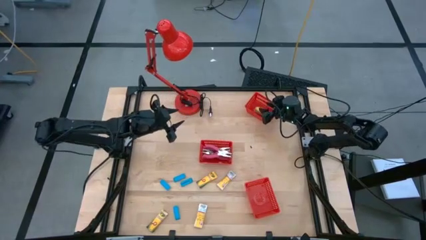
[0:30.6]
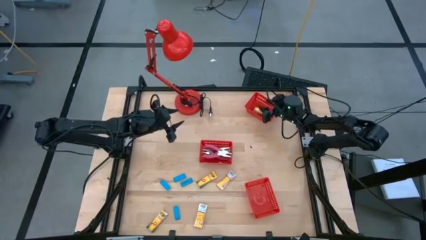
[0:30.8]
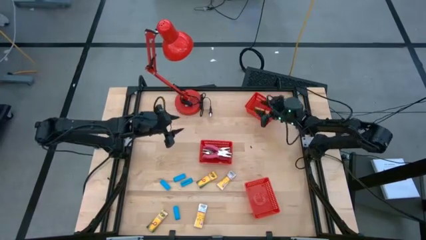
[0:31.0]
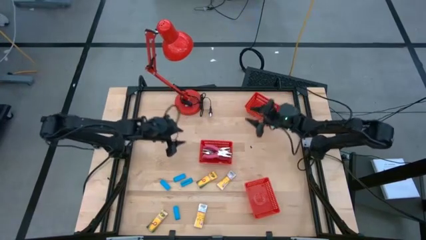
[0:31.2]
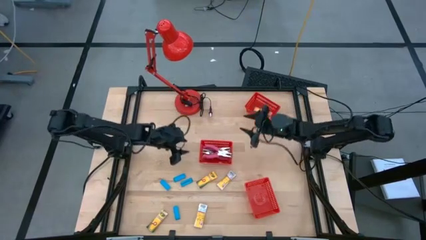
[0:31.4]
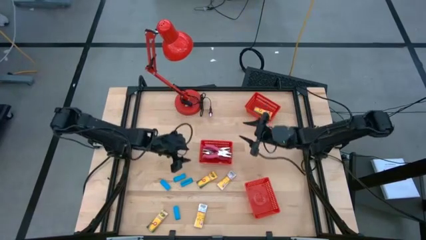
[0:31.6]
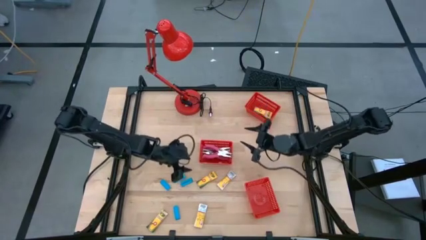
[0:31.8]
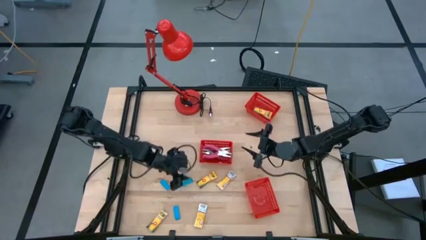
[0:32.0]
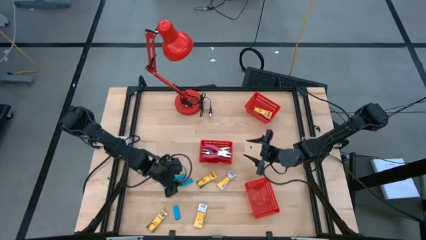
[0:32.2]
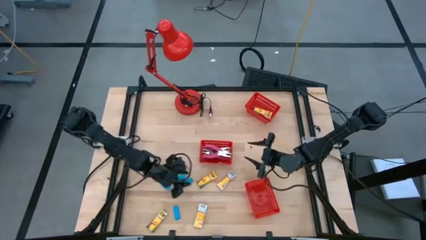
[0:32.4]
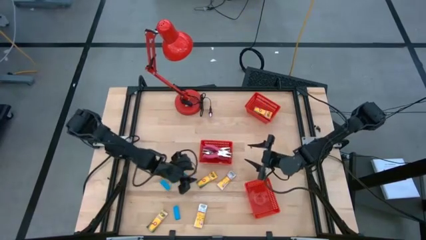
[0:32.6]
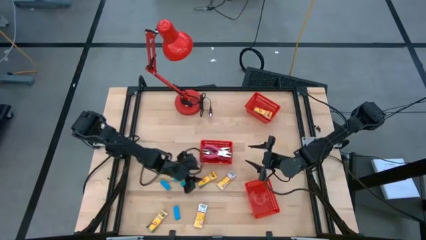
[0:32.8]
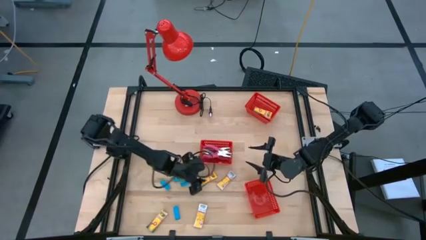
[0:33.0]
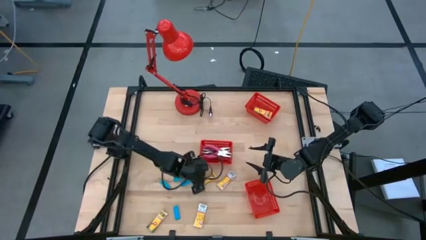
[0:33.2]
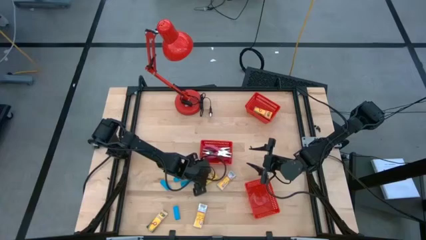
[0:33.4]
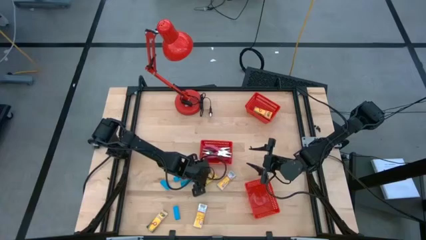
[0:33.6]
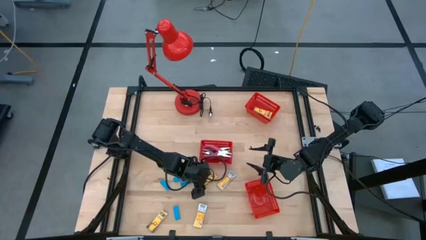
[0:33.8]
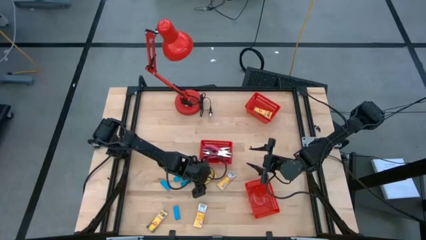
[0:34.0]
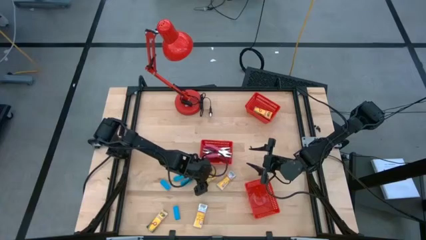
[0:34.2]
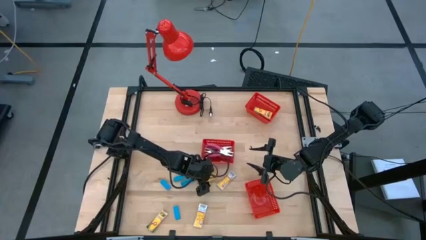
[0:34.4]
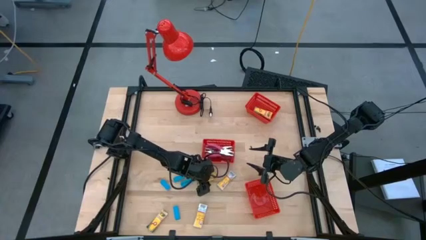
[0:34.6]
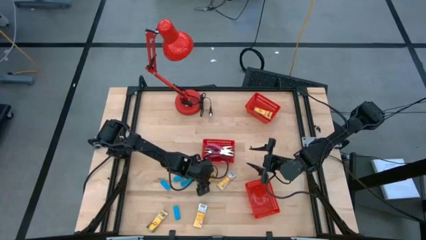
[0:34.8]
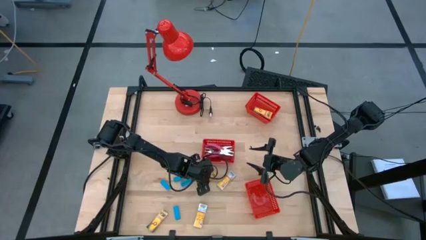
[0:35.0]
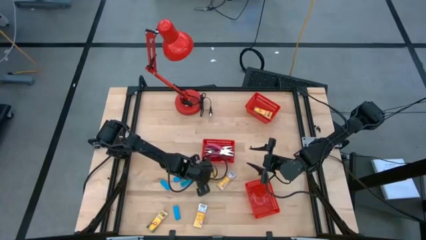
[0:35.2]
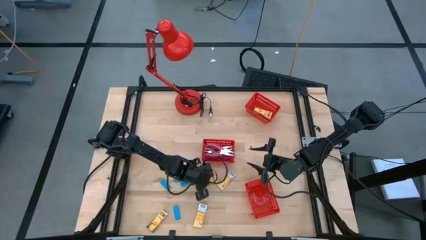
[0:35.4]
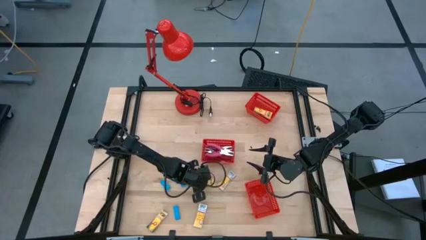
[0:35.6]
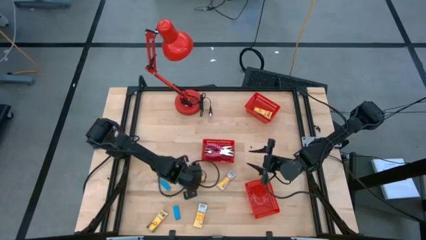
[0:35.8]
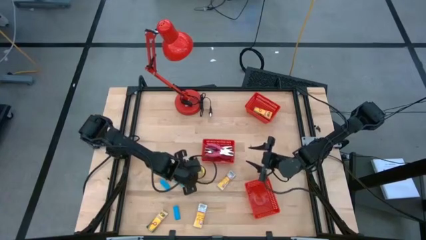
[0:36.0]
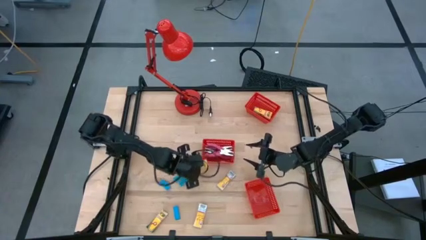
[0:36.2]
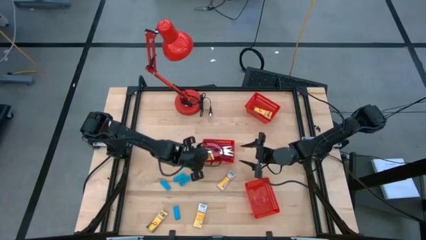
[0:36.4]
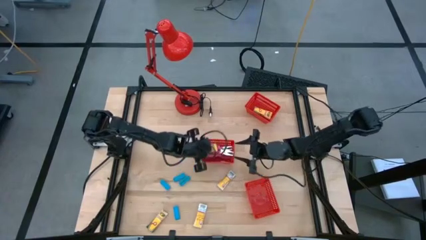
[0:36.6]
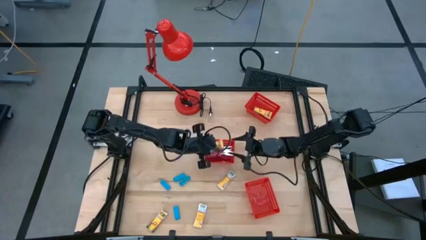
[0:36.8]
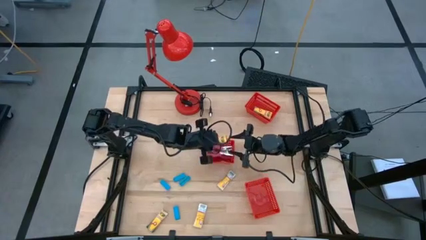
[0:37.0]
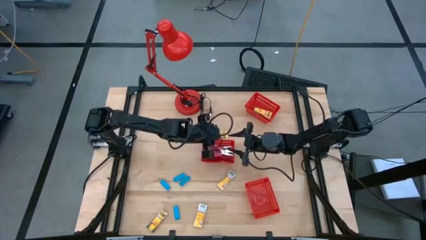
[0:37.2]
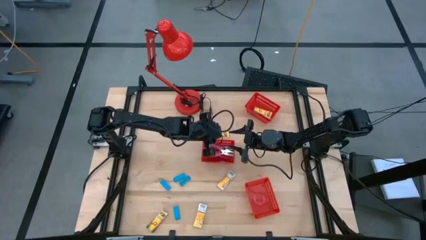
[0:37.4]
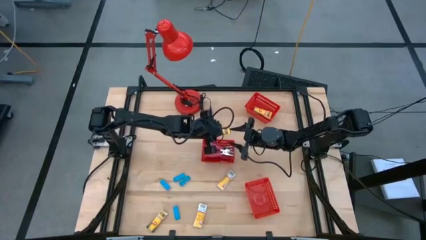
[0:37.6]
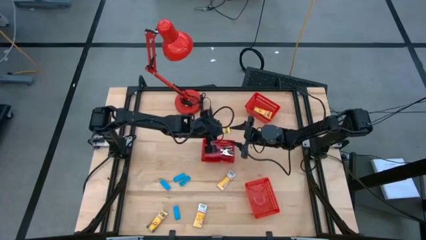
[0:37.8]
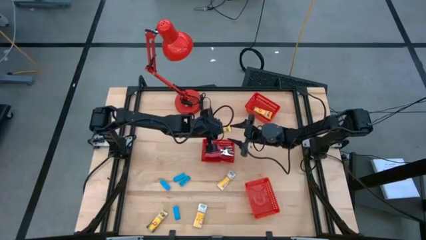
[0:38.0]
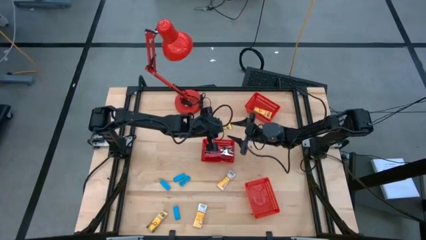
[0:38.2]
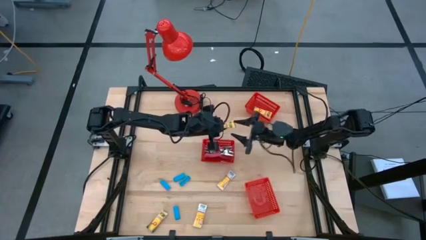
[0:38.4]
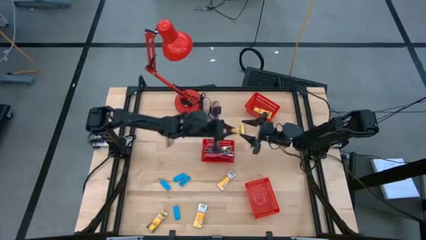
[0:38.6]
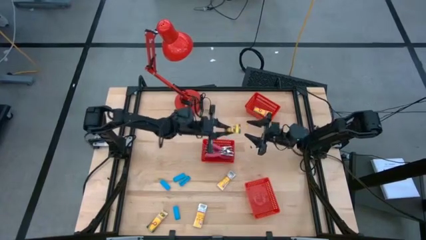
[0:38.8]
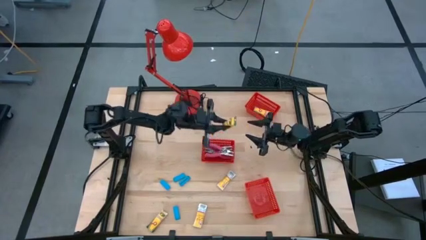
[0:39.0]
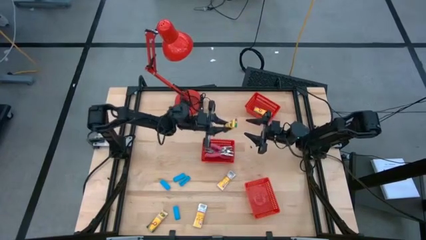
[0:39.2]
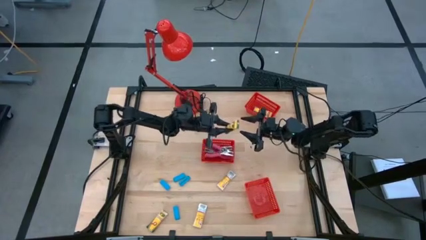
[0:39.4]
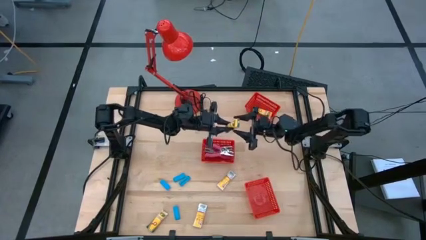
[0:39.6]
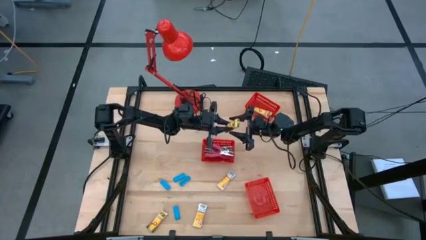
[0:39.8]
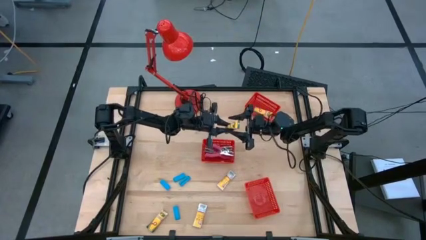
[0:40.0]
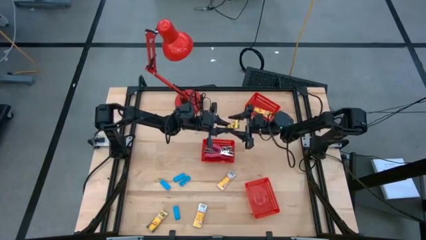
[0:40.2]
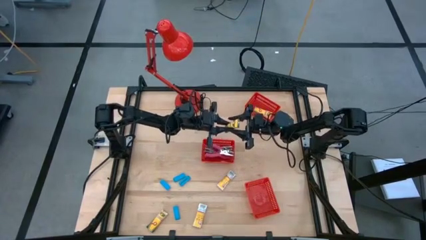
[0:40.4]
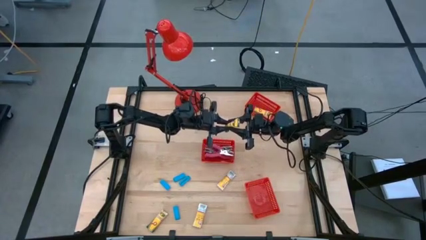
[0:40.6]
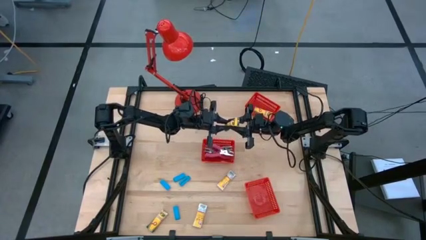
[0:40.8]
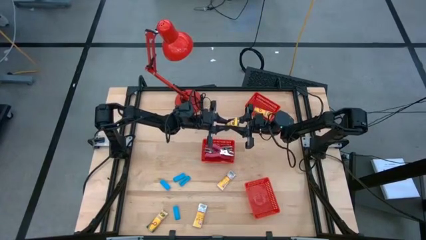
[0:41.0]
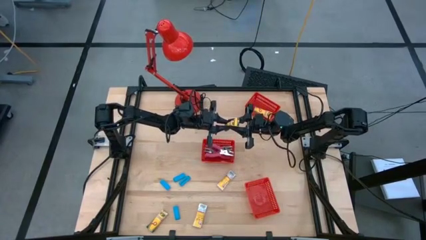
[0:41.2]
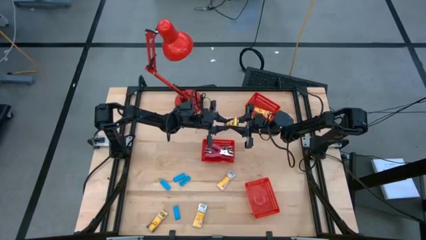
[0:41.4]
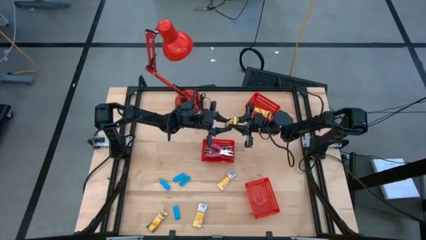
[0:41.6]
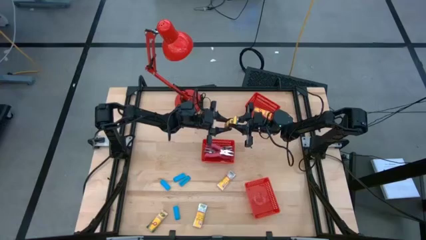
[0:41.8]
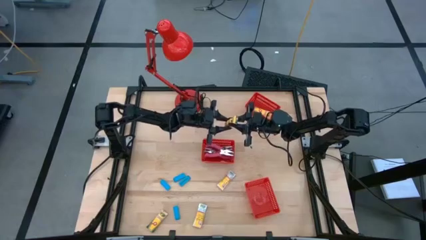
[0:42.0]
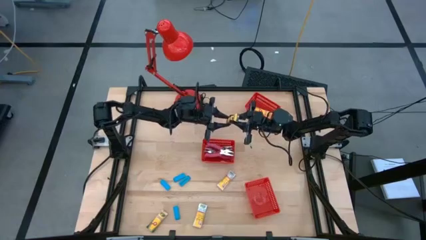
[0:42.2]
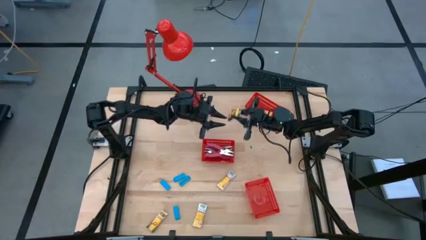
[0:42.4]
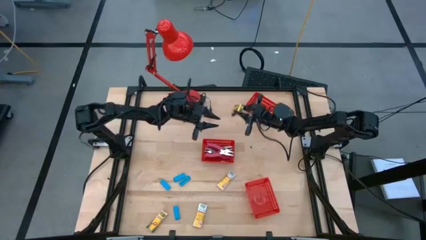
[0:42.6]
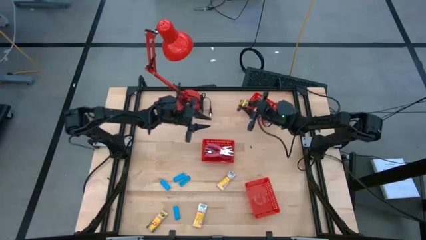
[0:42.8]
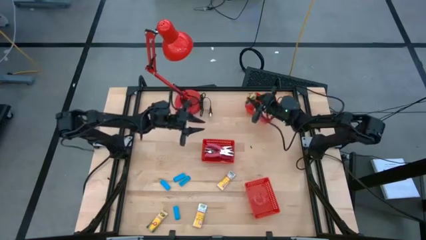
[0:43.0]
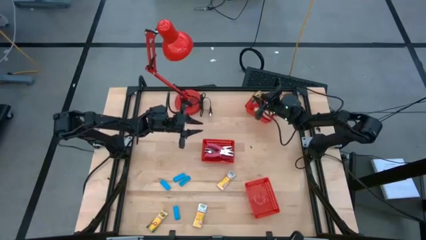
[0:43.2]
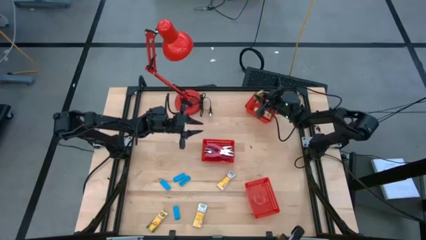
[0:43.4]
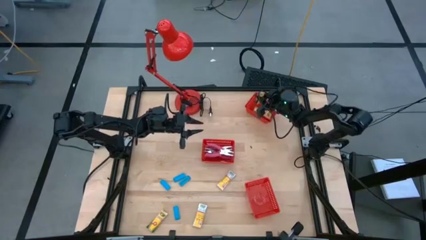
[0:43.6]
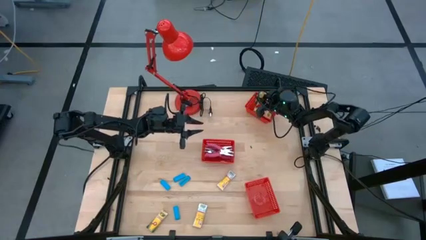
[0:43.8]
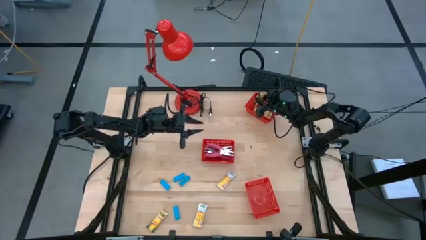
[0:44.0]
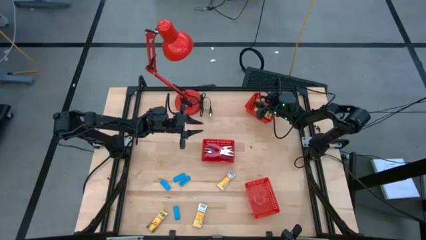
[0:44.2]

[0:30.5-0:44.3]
Task: Pick & Place School Supplies
Put the yellow crayon box into the top red bin
